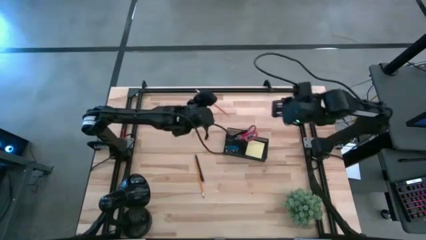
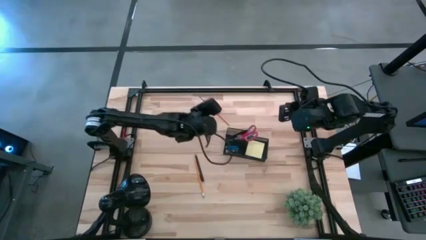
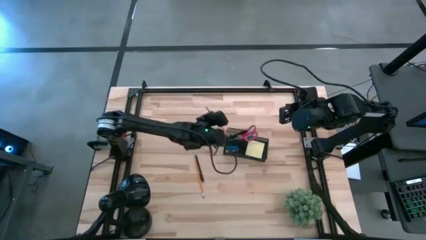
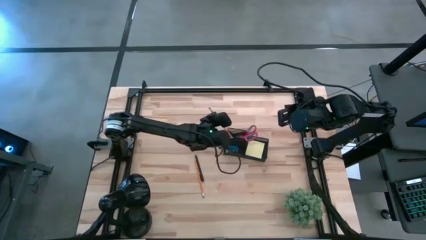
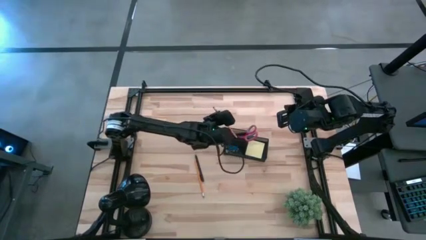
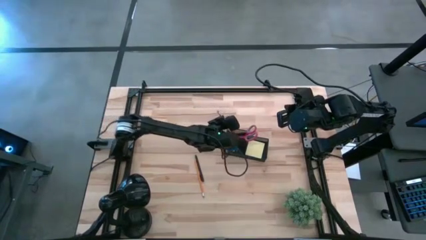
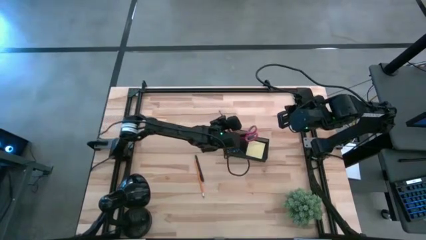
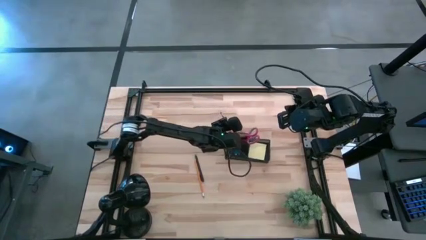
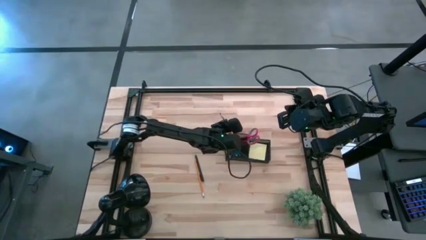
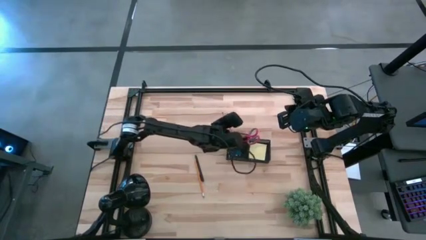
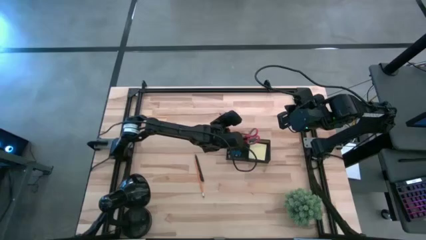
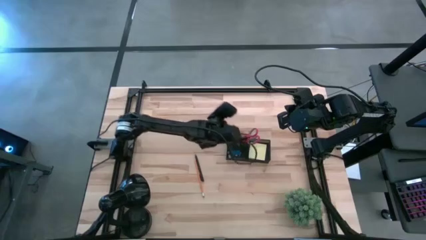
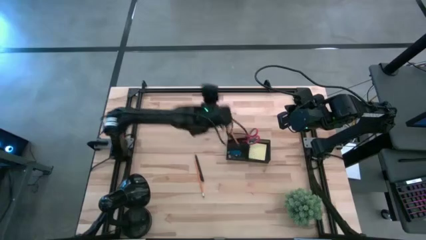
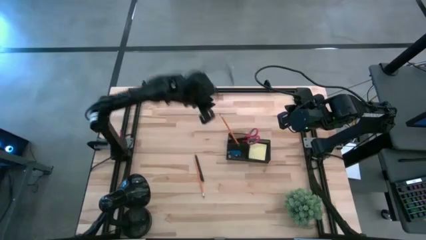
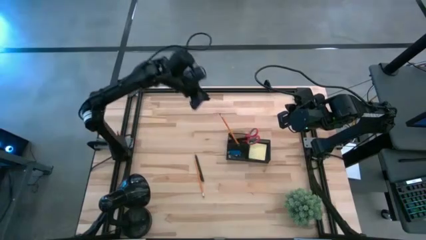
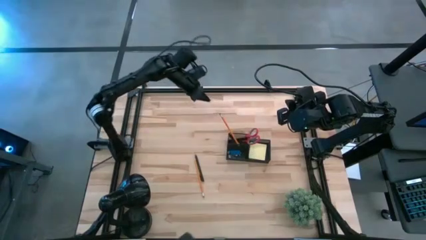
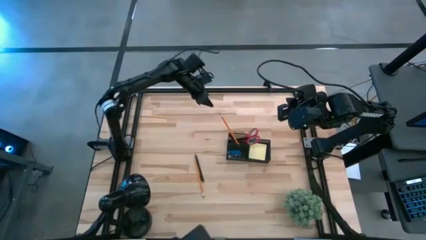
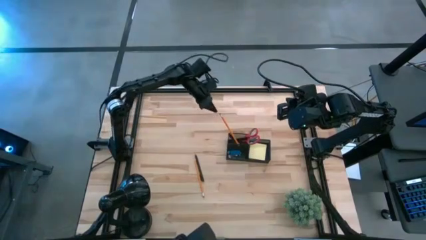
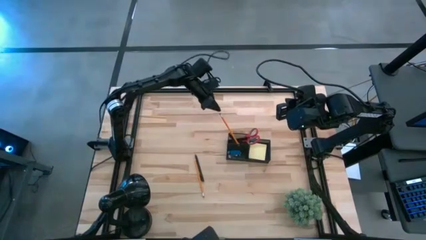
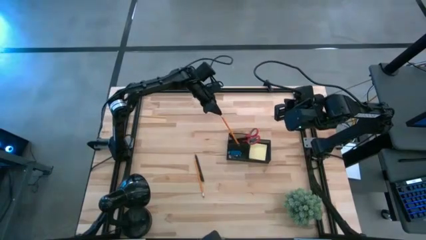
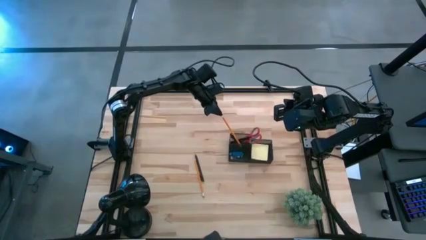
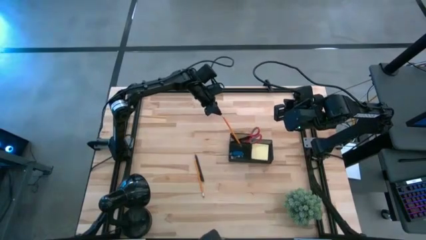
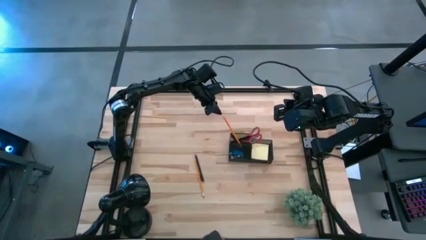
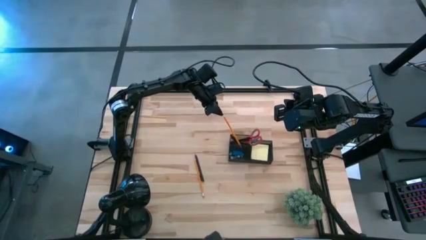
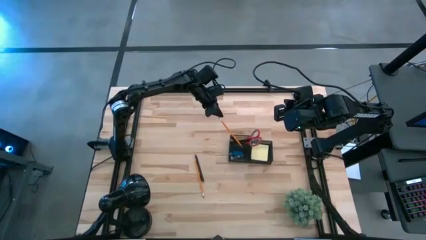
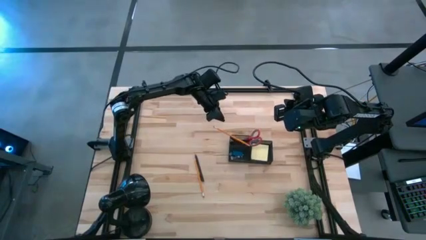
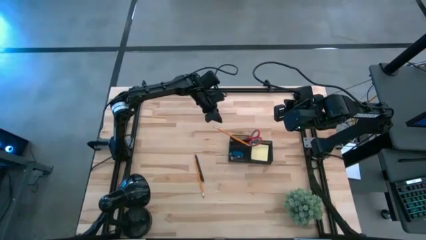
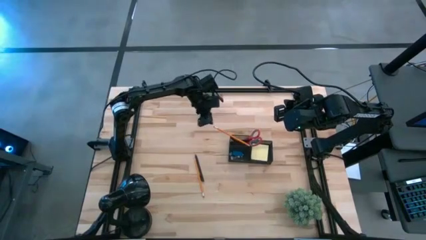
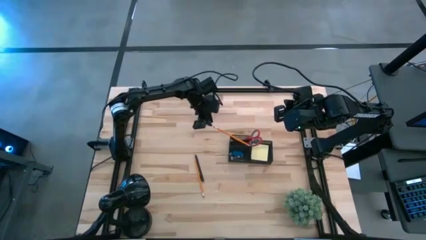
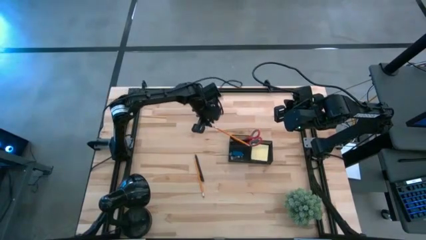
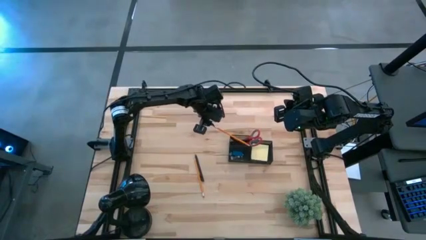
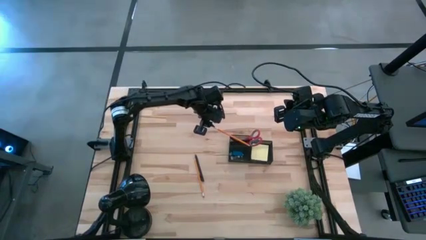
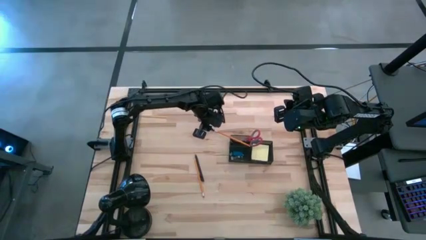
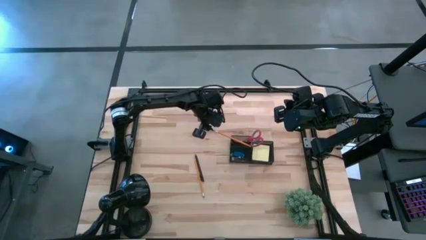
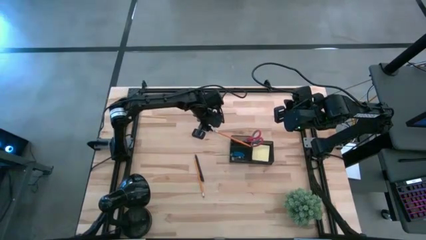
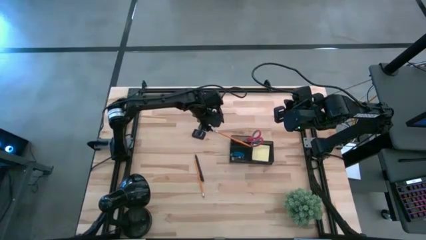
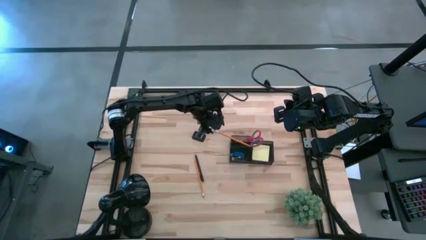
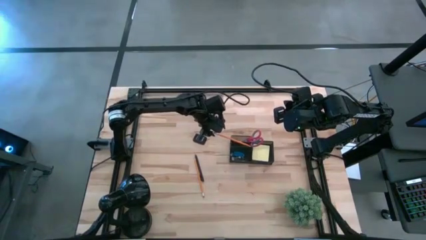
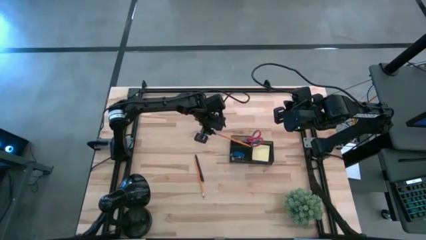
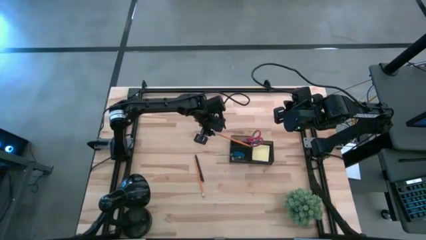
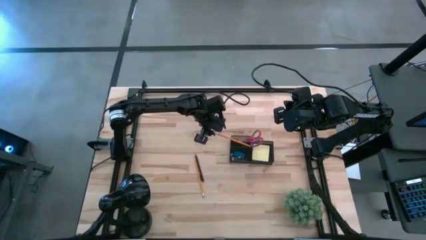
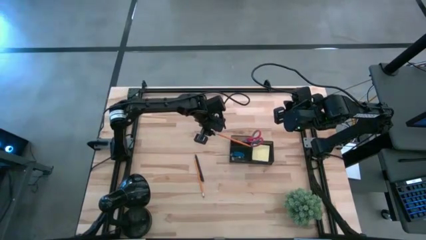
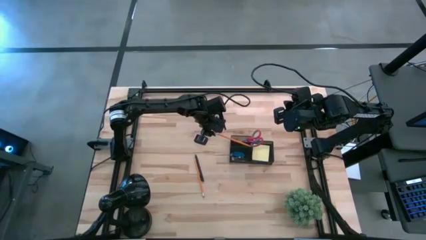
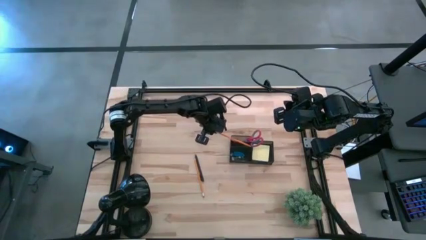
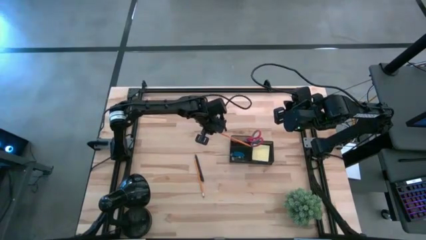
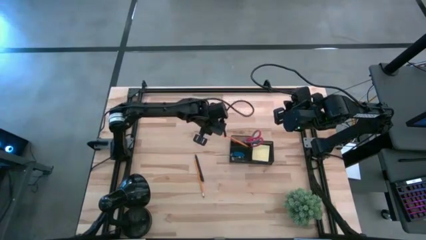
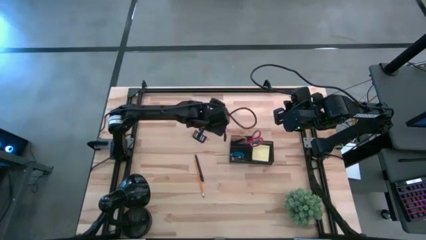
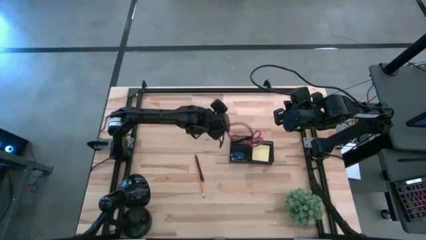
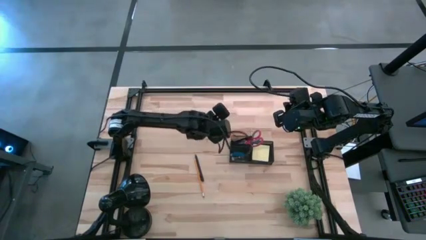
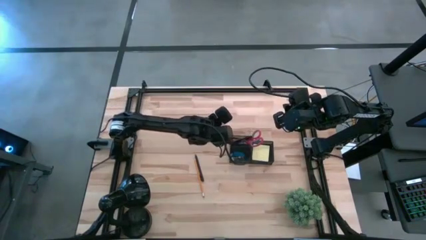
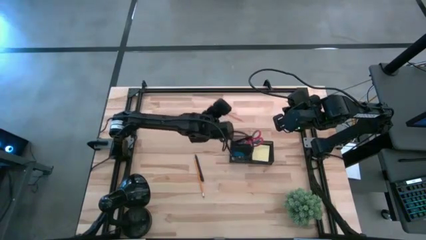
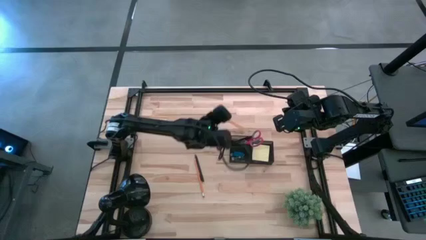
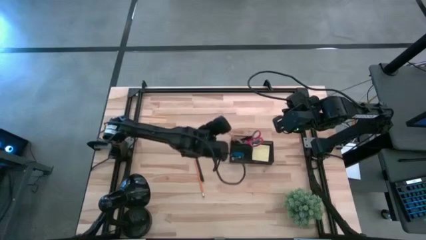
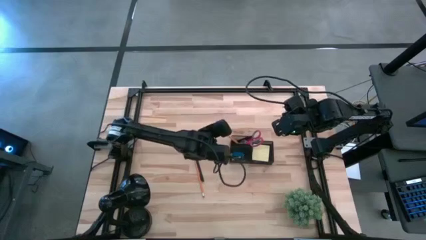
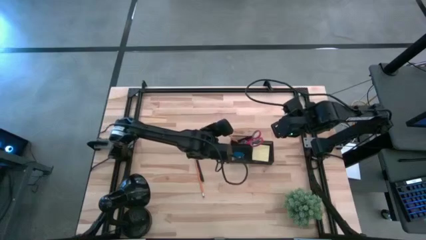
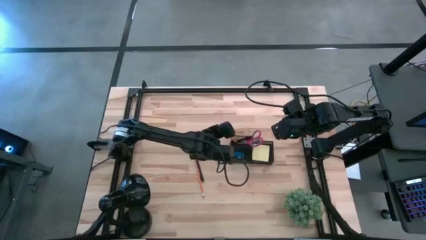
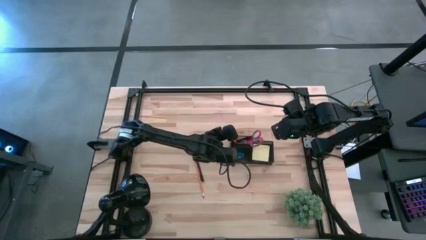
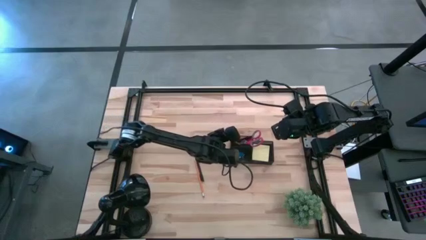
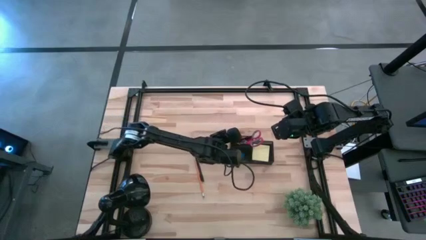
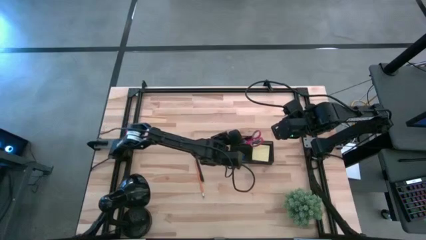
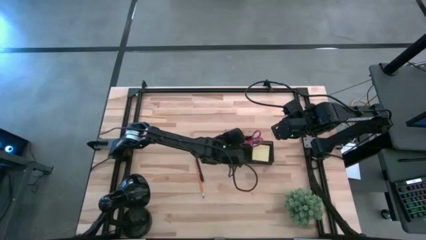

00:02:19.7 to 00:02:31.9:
Task: Pick and place office supplies into organizer
Put the top pencil into the desk organizer
